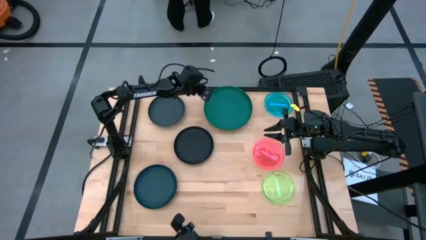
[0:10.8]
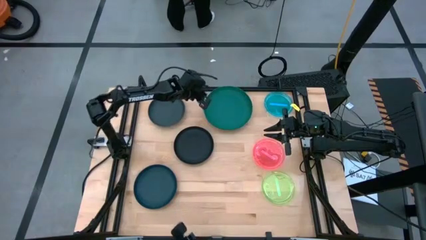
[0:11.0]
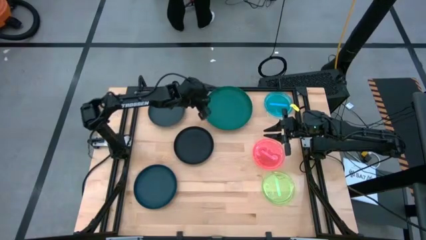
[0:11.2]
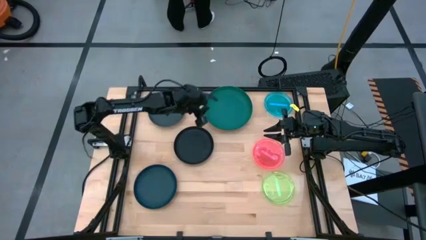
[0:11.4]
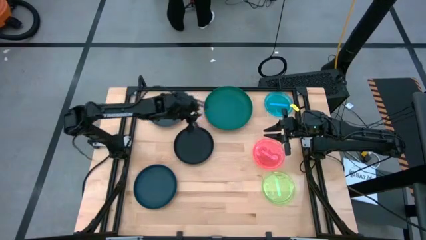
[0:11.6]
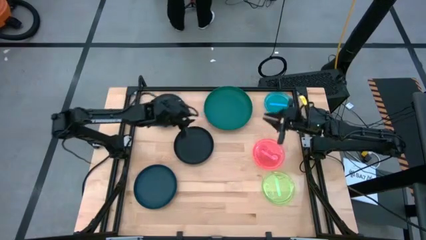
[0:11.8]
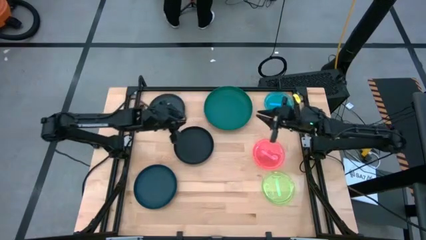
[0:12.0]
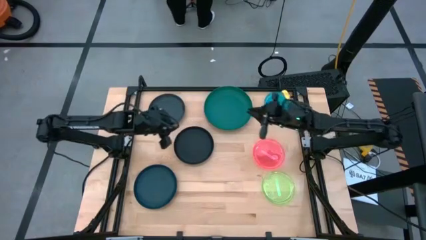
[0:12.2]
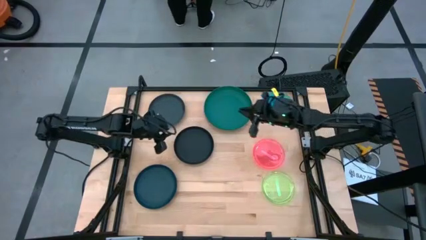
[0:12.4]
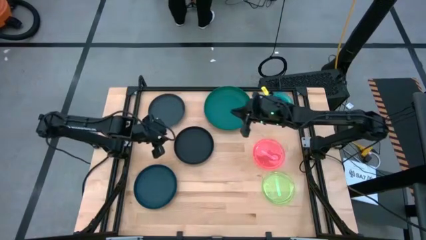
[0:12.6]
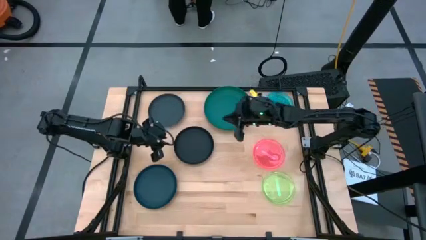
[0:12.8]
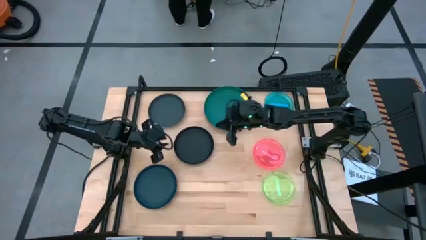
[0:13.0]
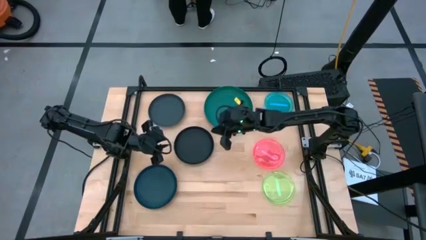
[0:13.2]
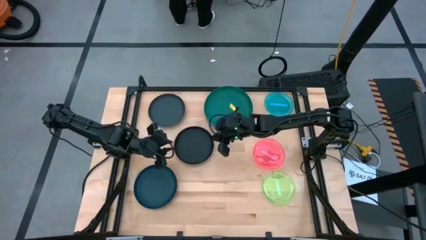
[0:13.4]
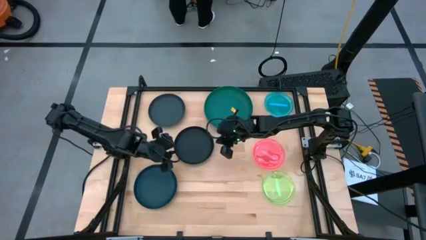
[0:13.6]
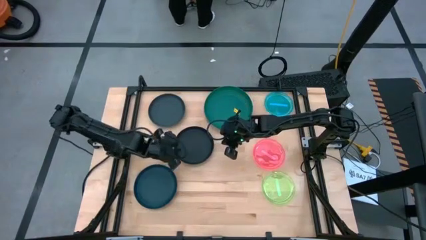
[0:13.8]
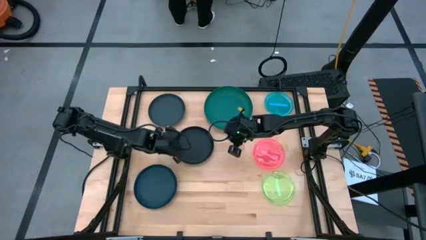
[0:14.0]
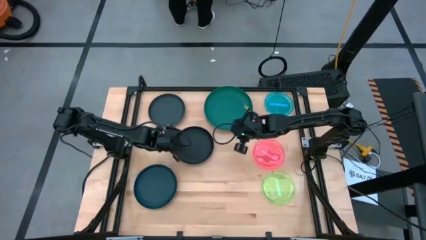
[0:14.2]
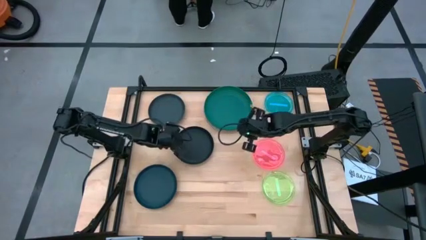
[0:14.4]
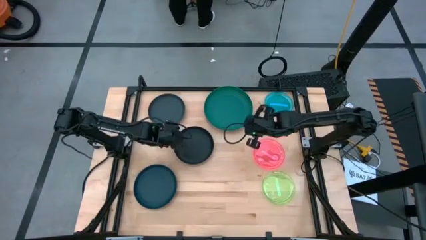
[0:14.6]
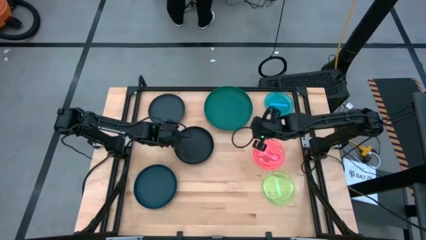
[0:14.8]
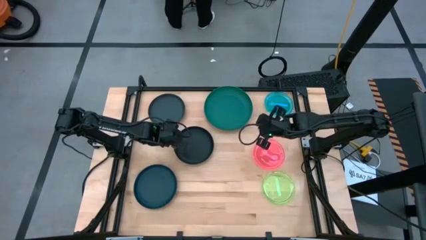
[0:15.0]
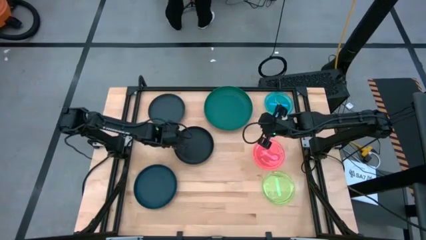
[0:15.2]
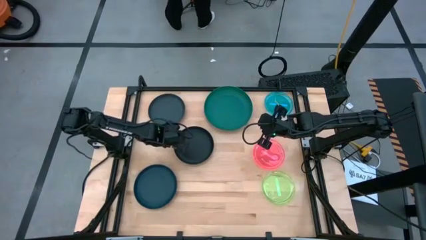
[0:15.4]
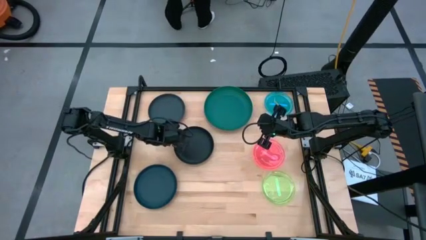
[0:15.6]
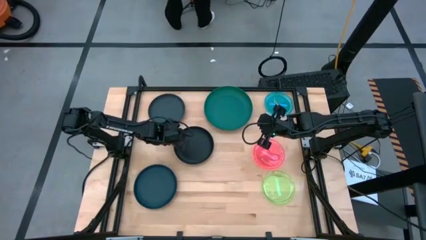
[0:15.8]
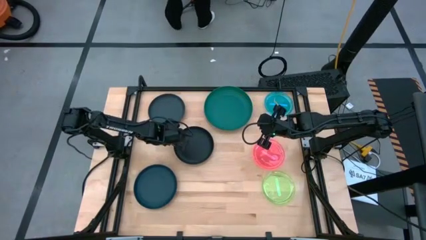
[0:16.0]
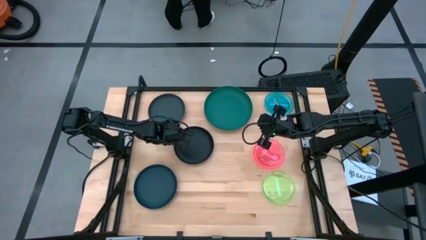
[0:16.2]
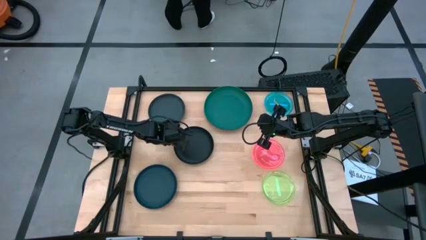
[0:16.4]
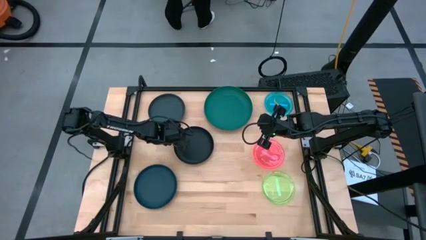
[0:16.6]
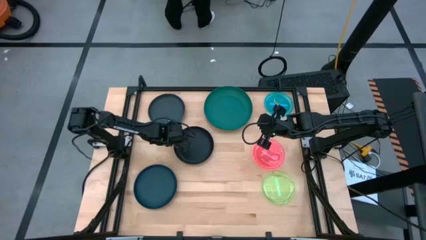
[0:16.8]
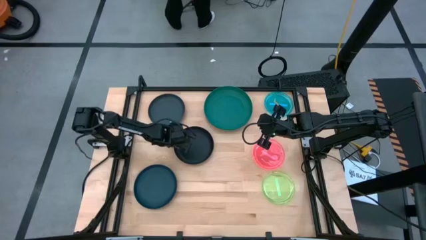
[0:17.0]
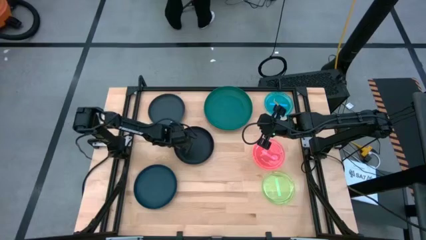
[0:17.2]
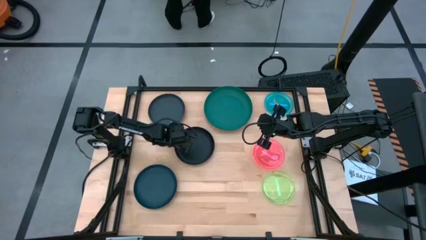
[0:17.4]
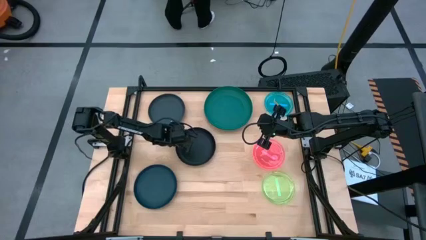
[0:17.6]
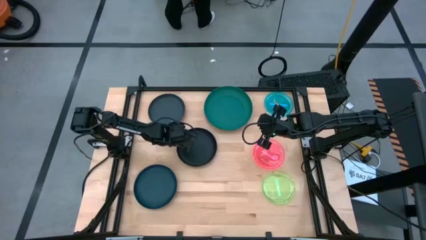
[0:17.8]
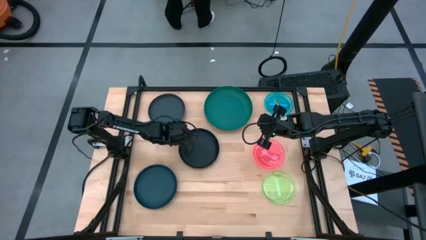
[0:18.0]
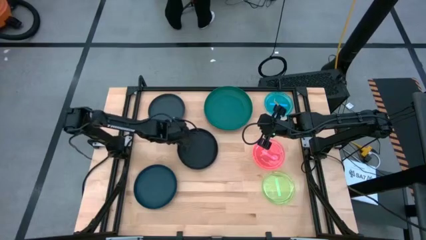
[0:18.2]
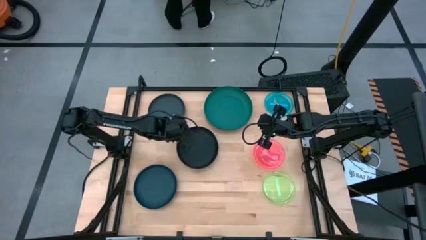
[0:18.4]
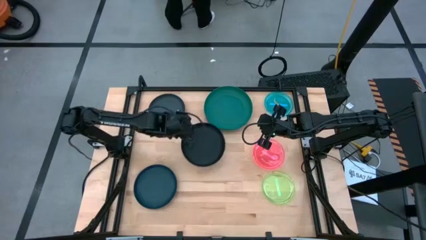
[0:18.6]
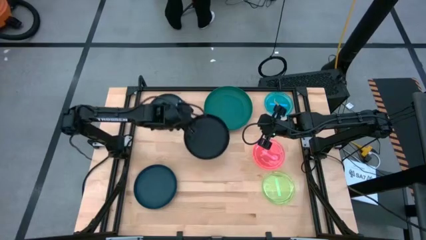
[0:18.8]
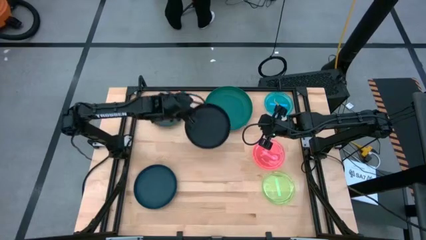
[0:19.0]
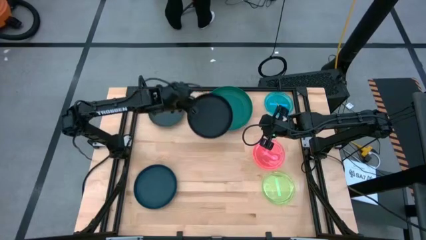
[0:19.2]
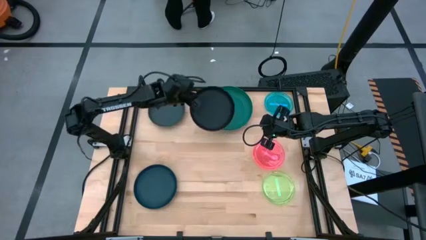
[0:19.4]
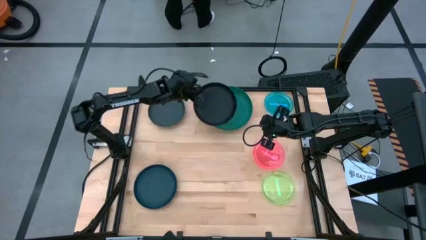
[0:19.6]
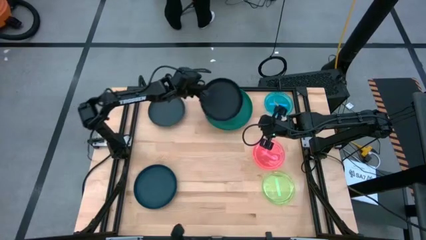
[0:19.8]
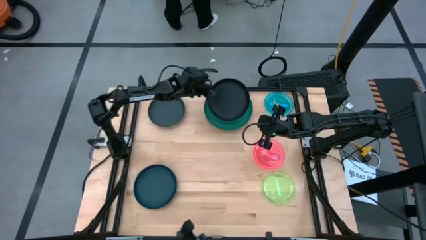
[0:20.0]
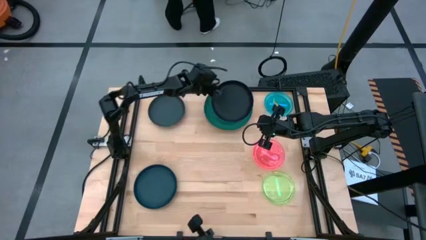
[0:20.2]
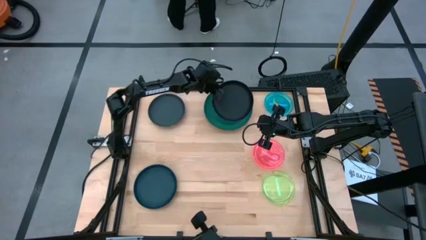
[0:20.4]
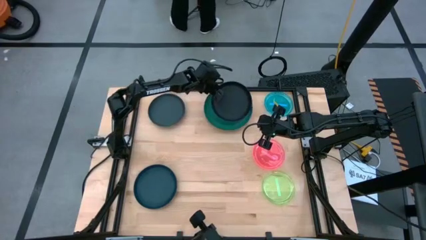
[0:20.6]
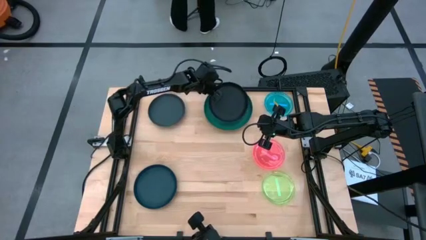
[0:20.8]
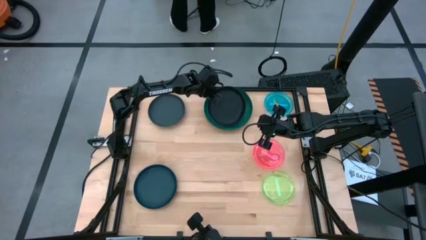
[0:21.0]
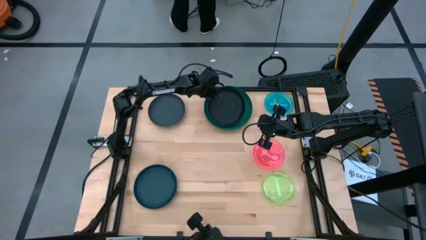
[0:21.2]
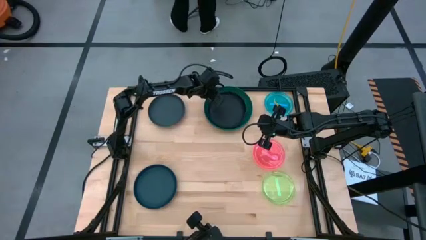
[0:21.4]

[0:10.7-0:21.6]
Task: Stack plastic plates
Stack the black plate on top of the green plate
